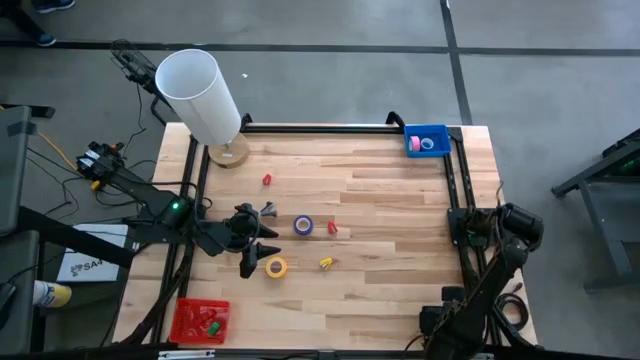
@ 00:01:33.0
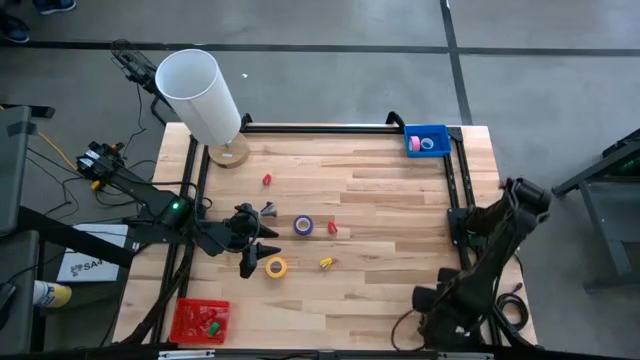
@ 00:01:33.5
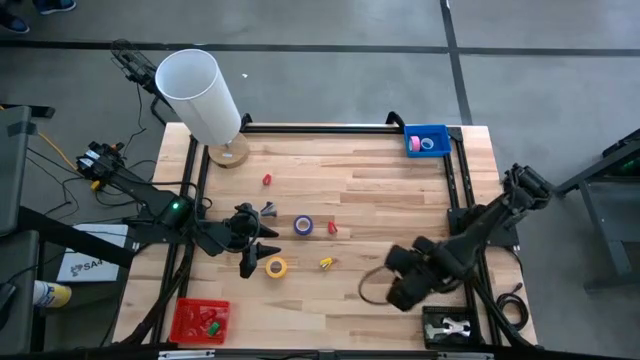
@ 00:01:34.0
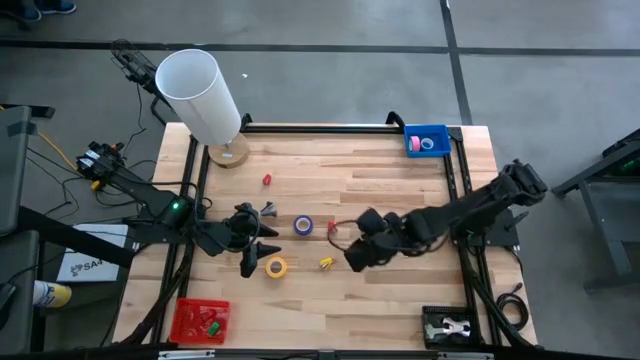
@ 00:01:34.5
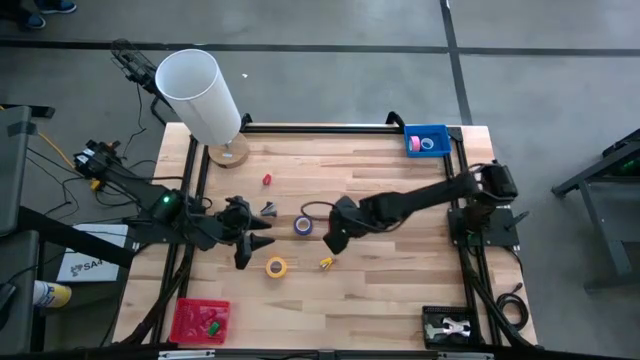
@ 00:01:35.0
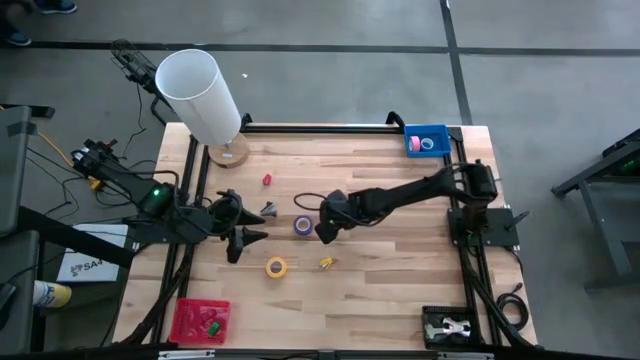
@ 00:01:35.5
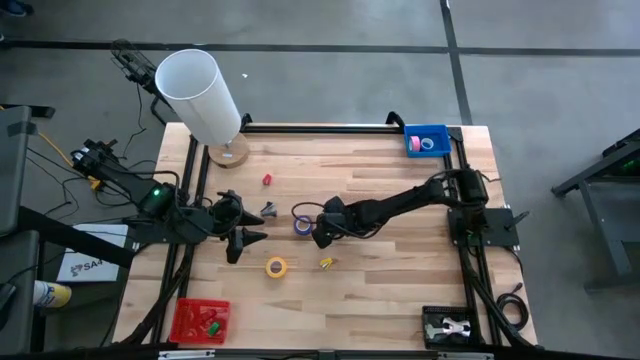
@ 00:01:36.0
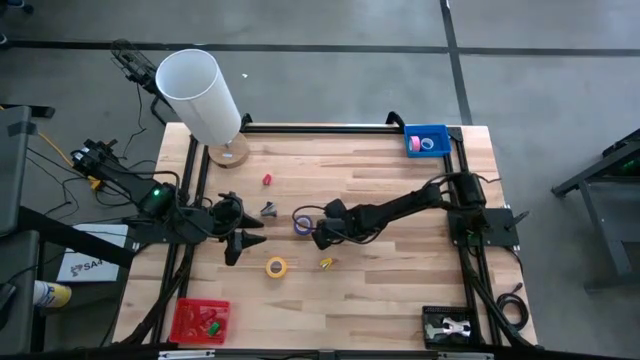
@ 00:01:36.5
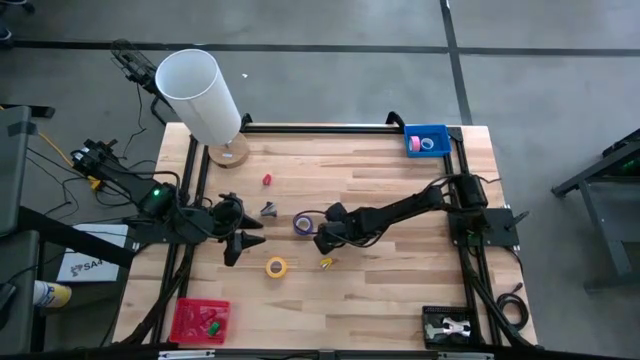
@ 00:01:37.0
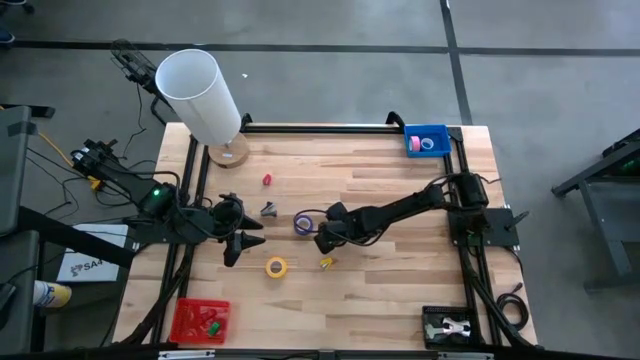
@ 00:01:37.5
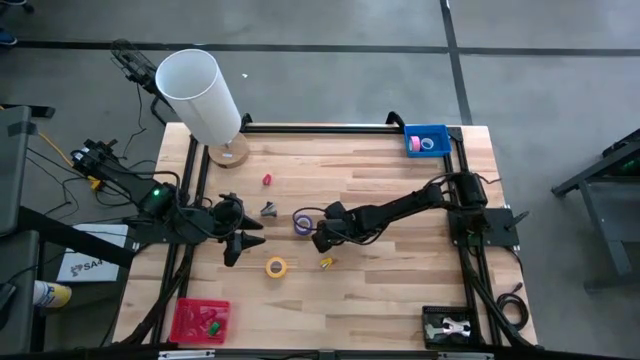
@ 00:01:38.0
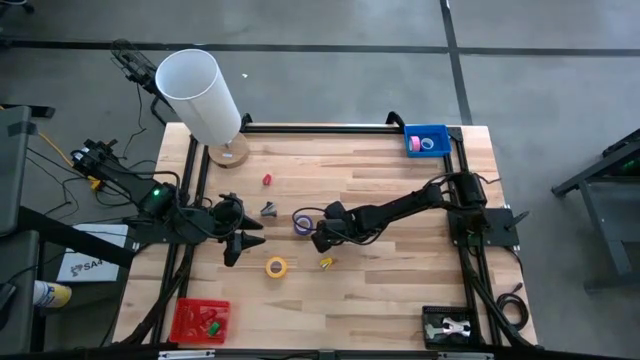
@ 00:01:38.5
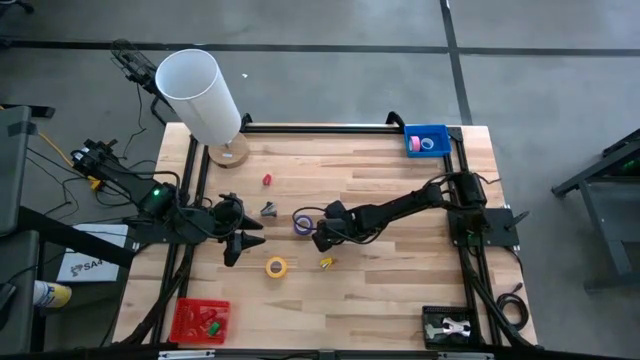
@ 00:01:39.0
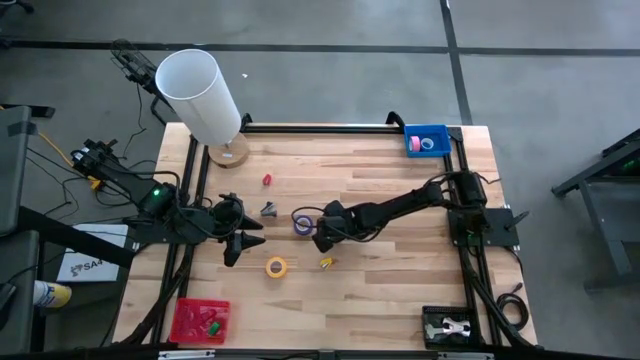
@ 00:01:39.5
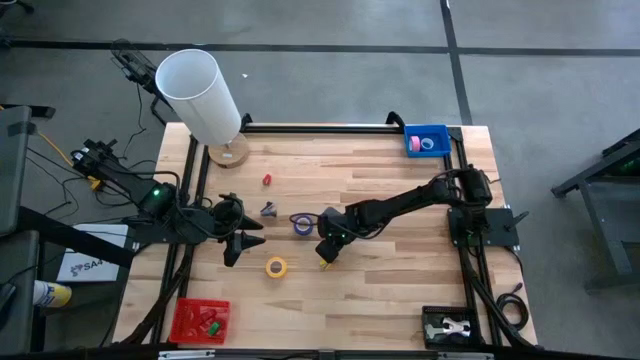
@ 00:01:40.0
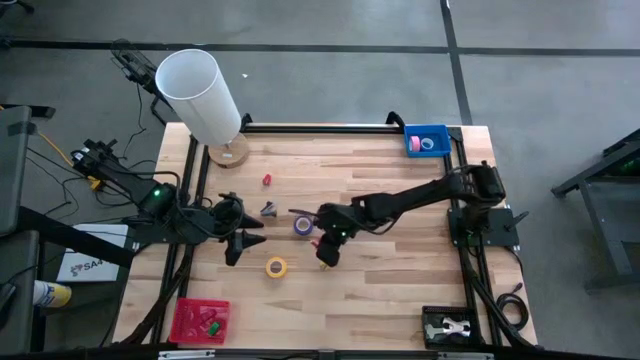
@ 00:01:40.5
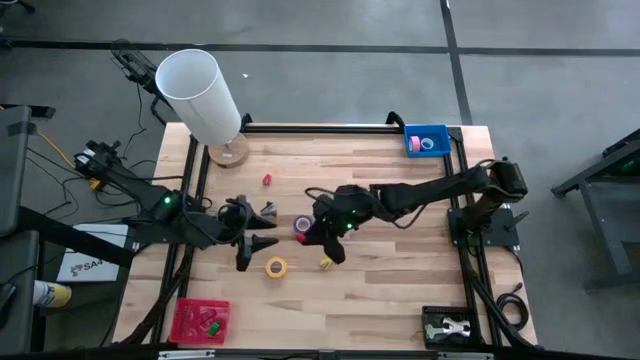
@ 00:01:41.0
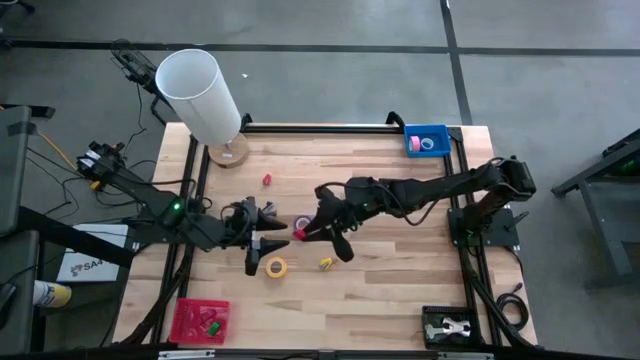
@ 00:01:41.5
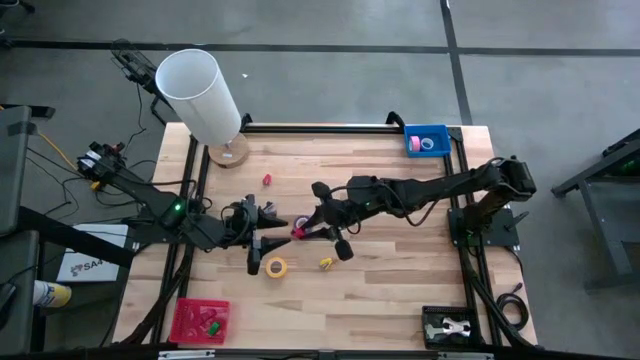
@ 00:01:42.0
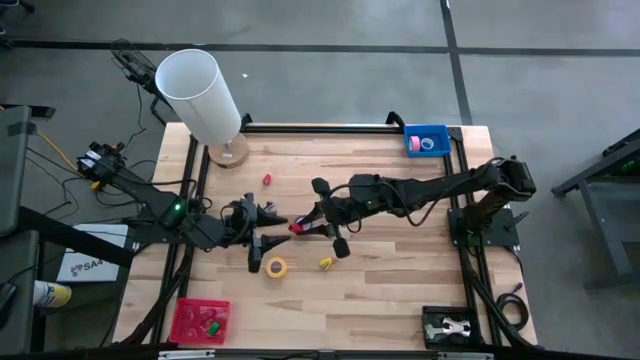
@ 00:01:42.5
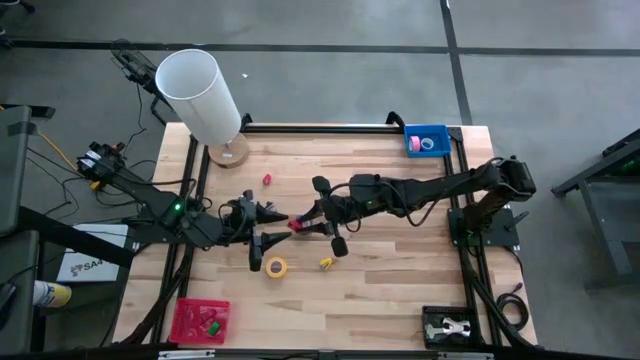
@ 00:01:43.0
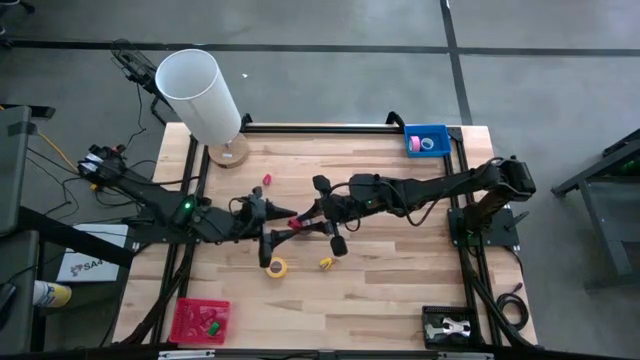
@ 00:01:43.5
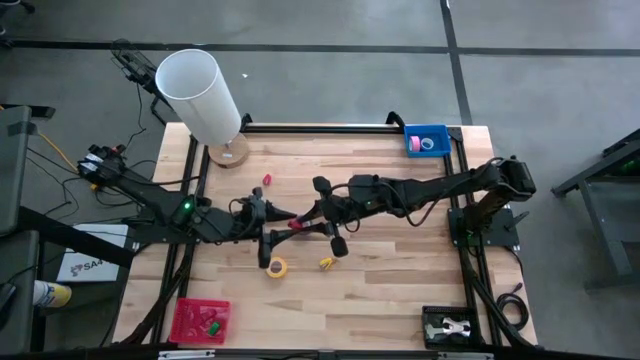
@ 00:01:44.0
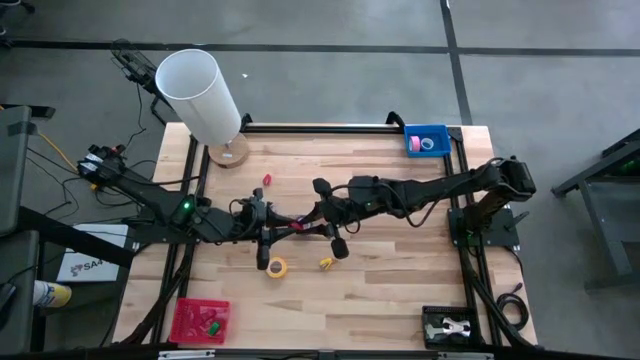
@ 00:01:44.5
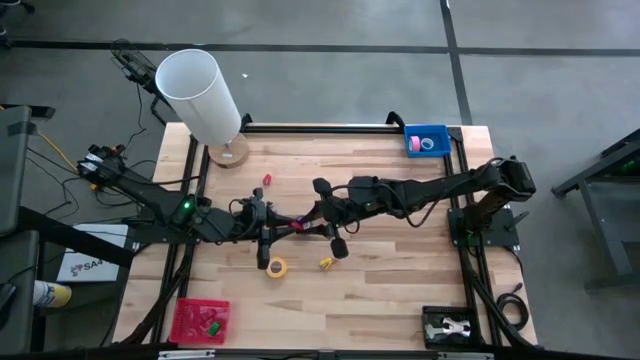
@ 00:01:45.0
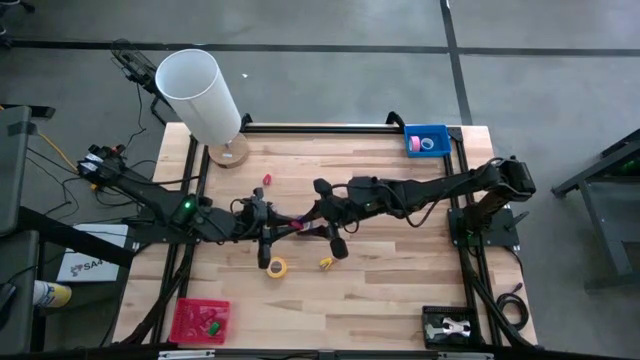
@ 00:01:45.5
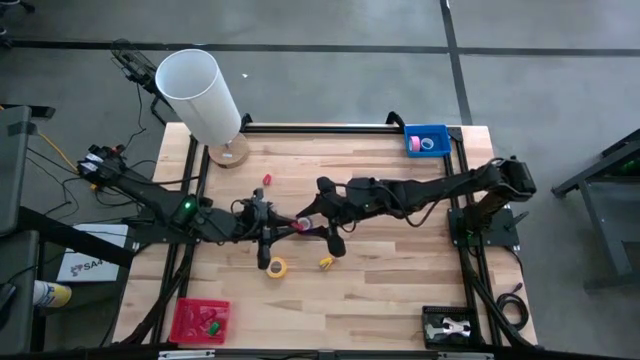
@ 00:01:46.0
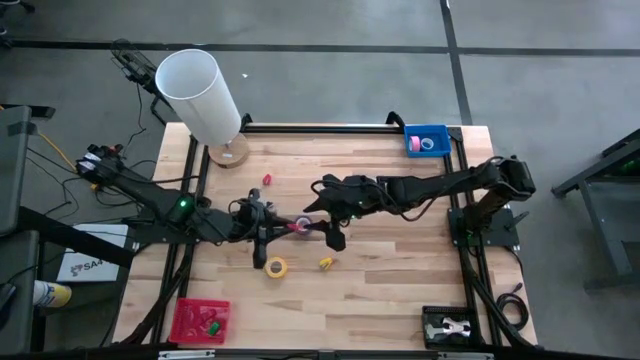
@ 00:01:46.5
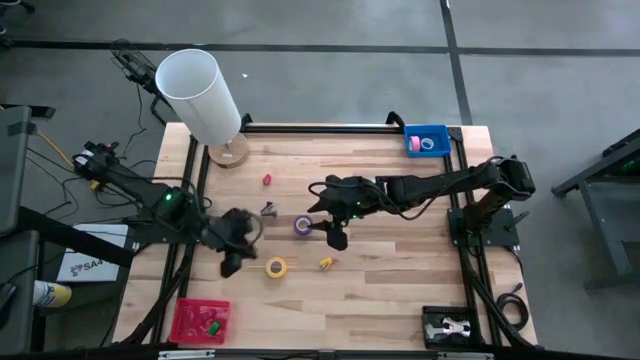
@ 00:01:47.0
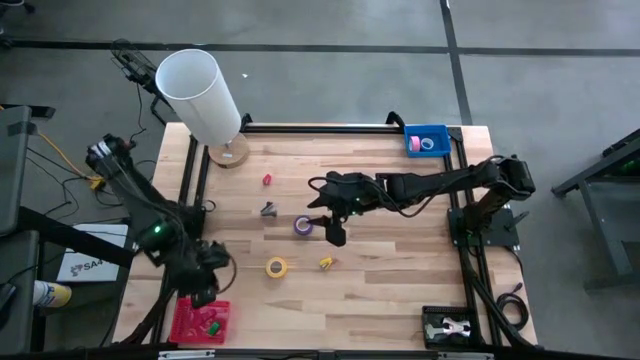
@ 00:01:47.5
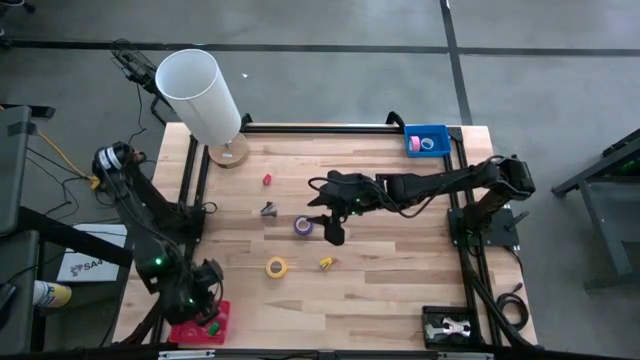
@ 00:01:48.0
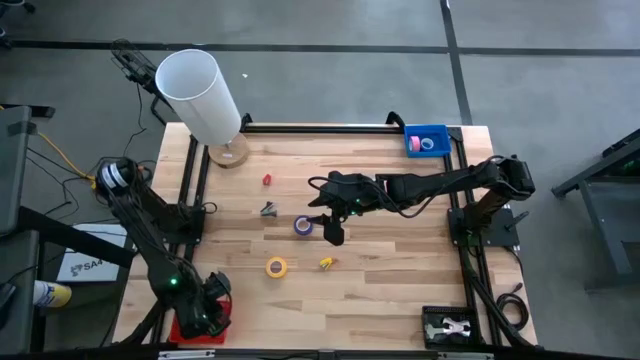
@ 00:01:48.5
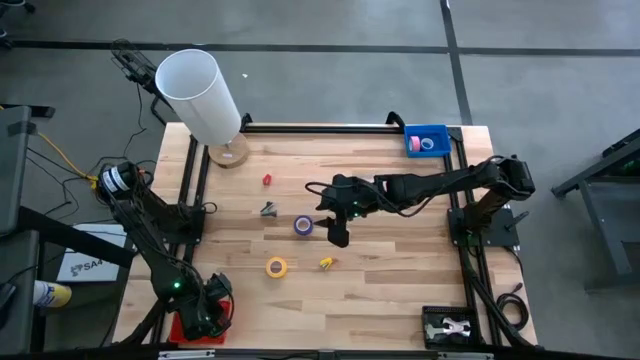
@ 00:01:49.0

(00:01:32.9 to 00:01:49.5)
Task: Pick and place Stapler, Stapler remover, tape
Put the bottom red stapler into the red bin

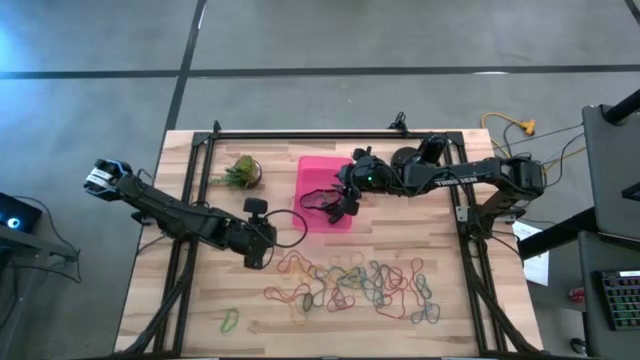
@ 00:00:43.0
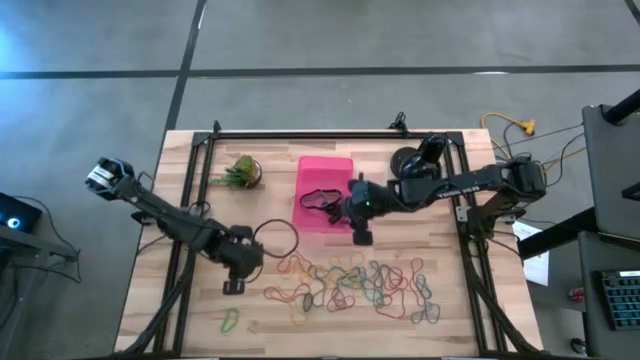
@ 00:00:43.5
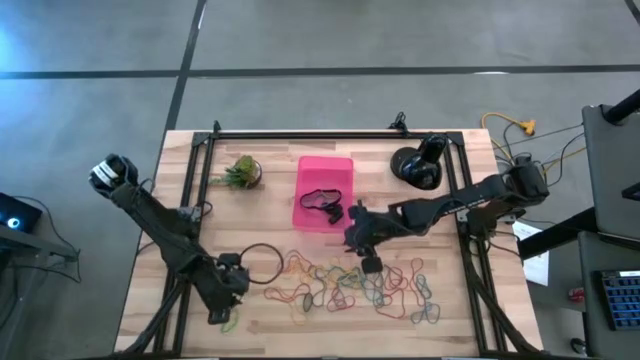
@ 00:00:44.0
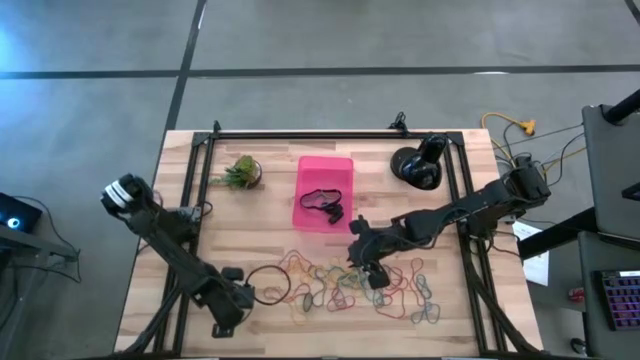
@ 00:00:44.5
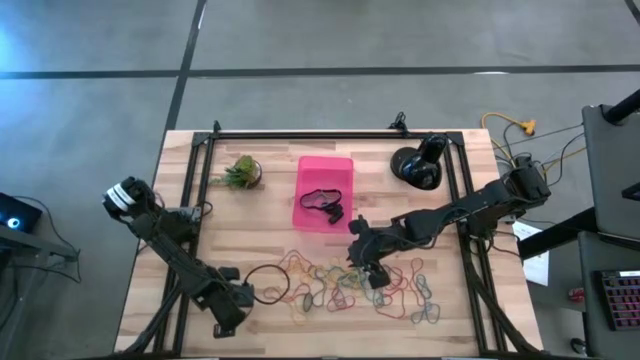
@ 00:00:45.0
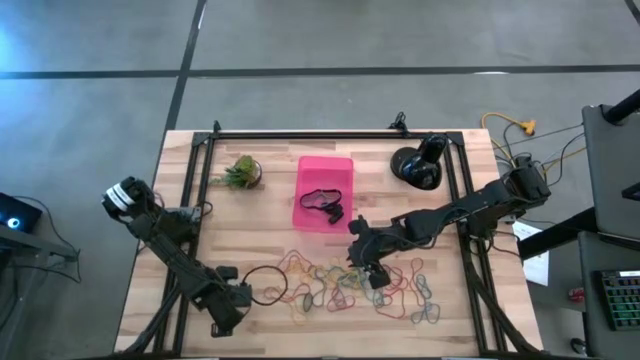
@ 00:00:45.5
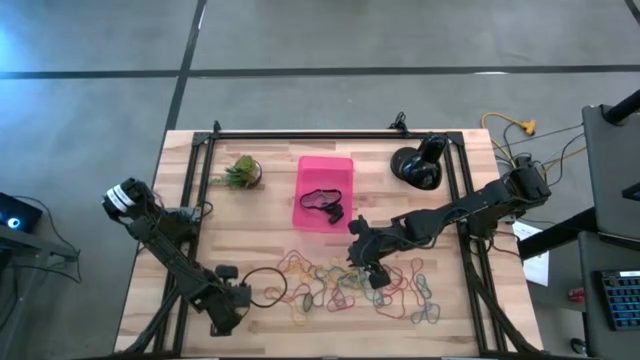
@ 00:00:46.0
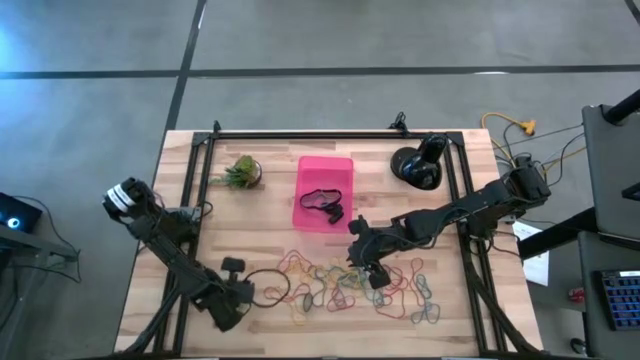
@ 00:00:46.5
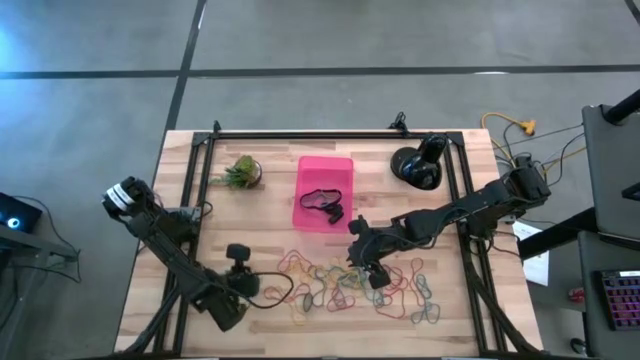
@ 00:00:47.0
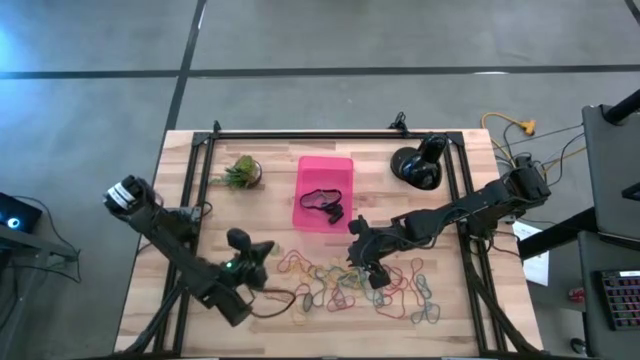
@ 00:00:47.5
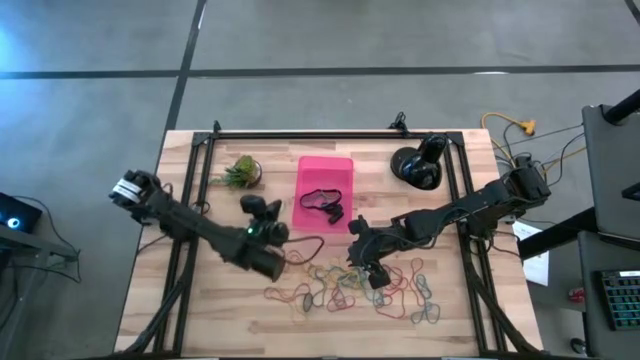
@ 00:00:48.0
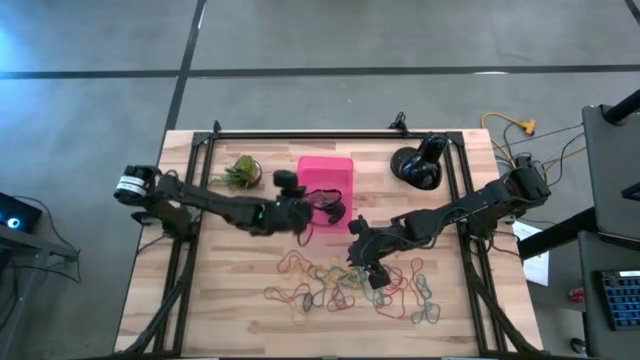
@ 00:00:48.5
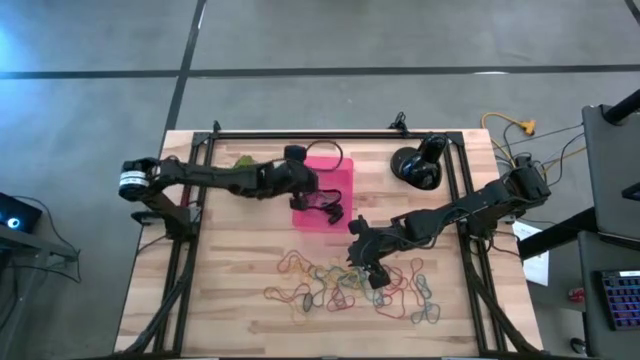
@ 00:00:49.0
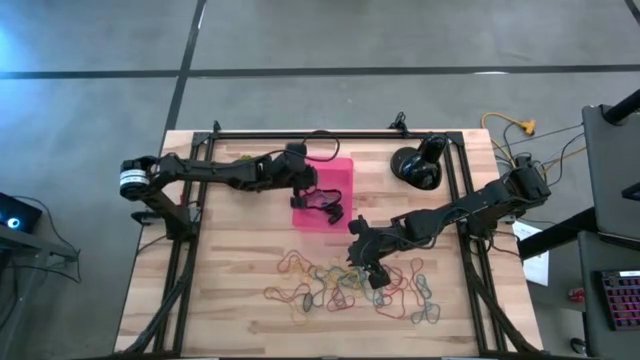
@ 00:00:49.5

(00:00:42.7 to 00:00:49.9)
Task: Pick and place rubber bands into bin
Put the green rubber bands into the pink bin
